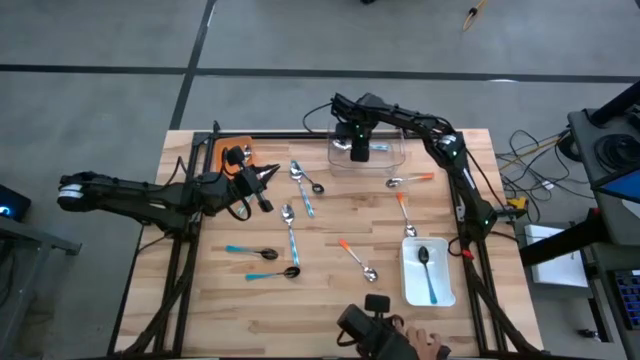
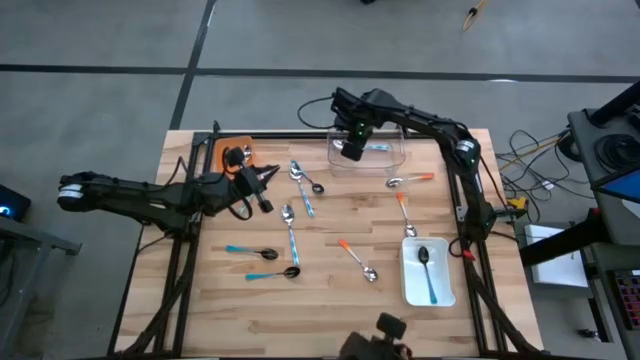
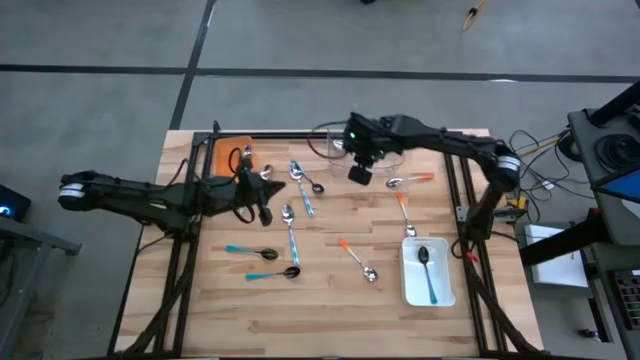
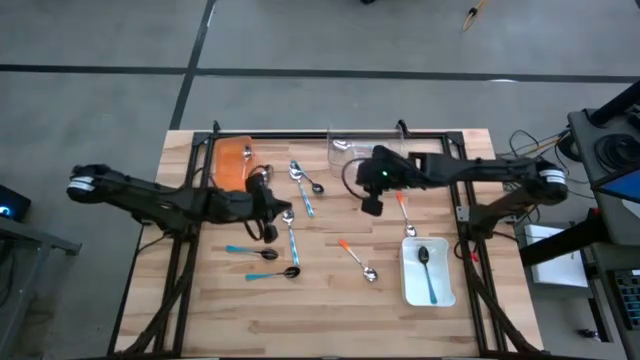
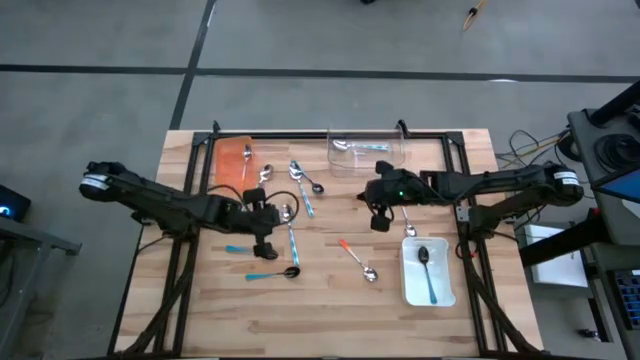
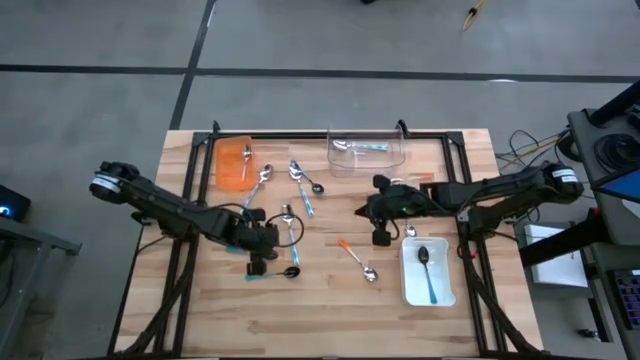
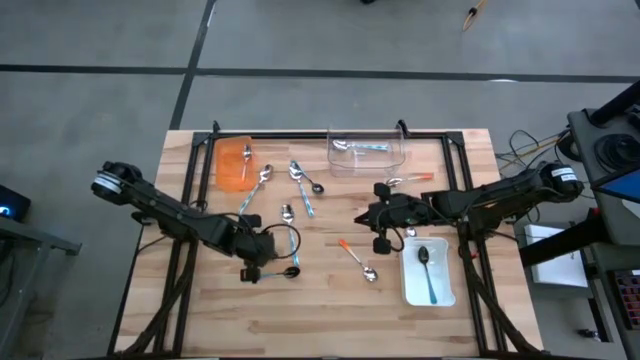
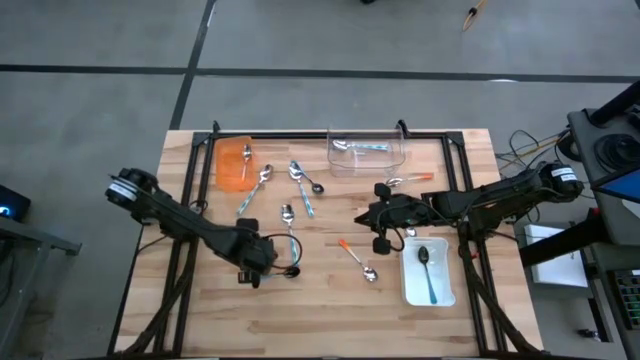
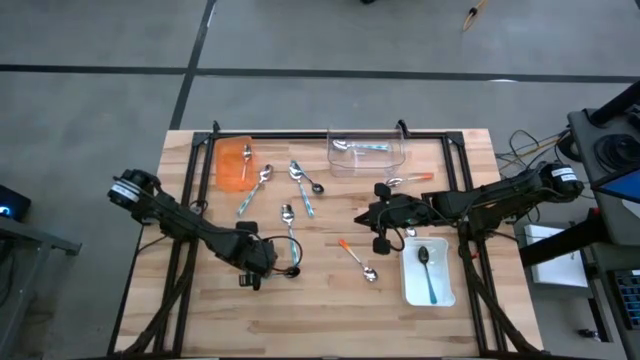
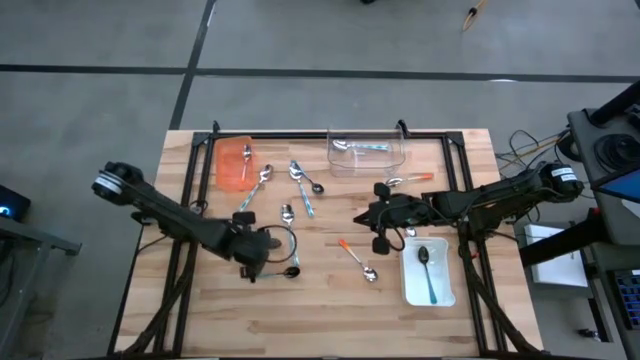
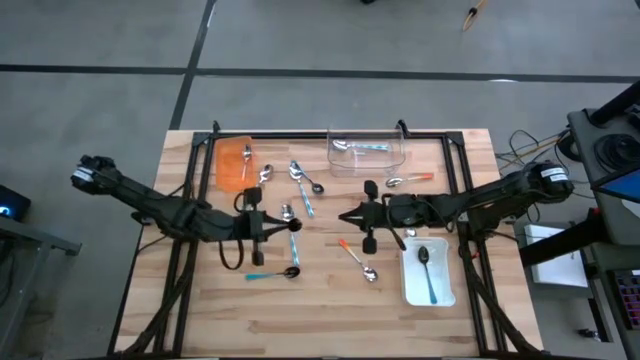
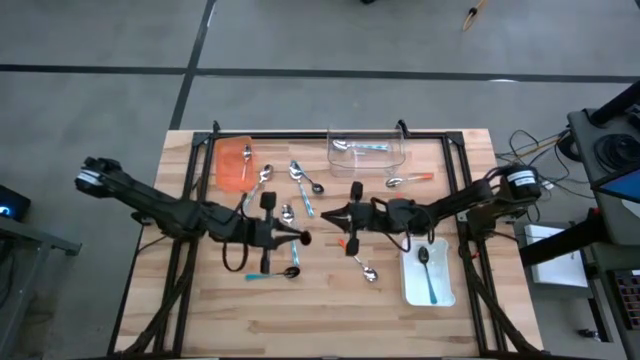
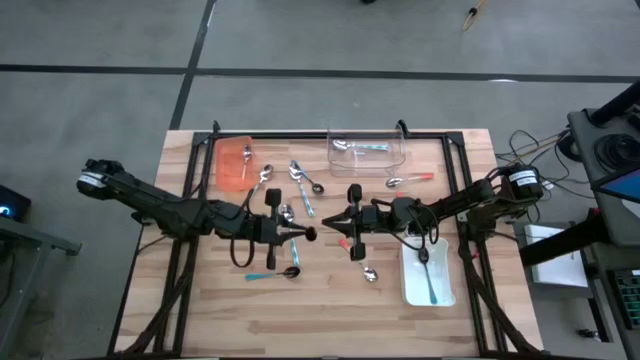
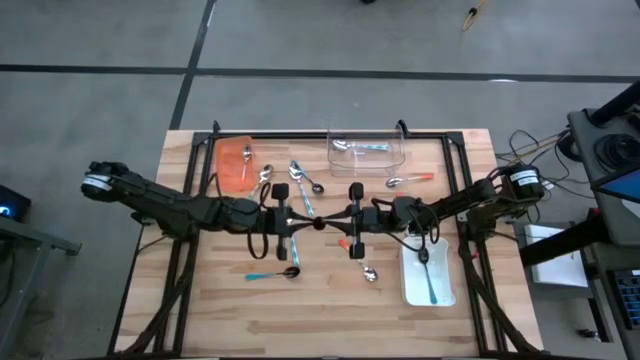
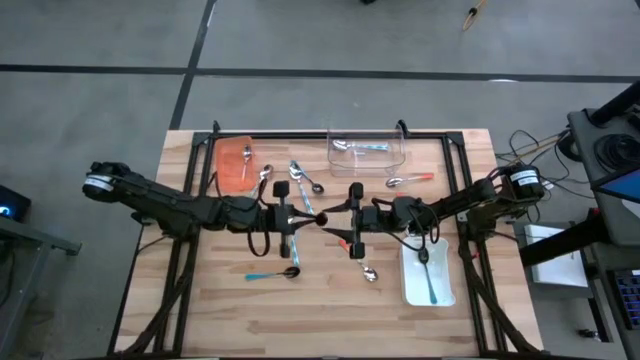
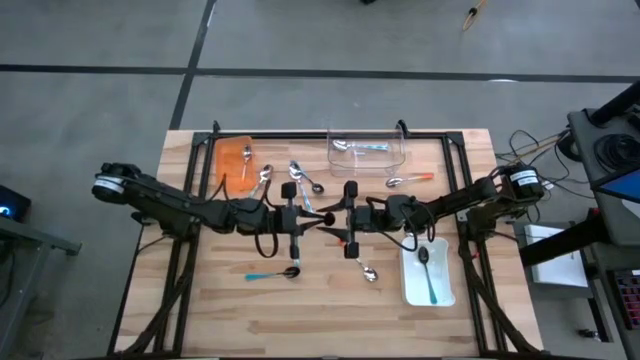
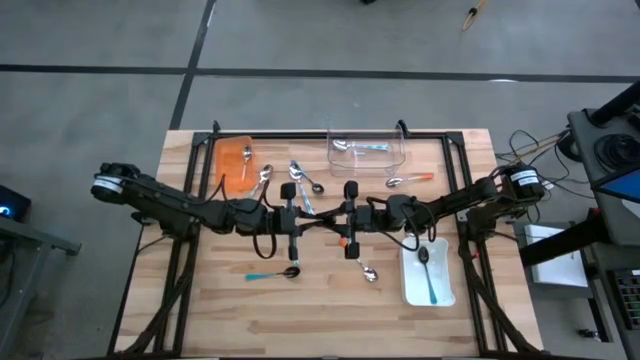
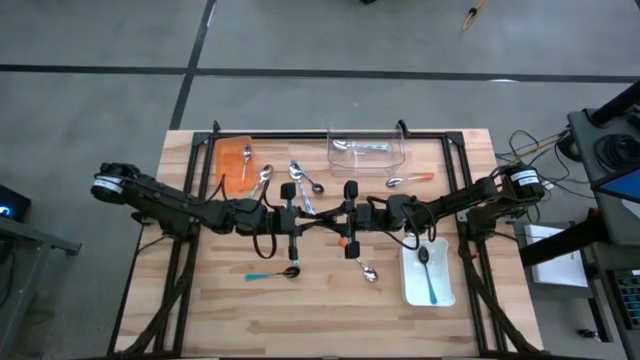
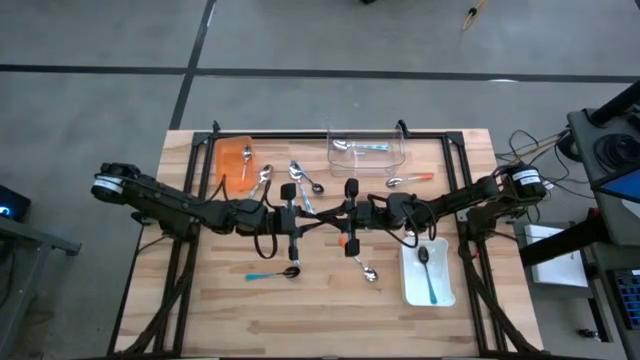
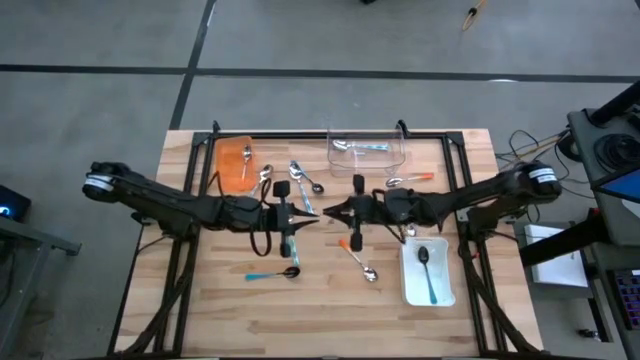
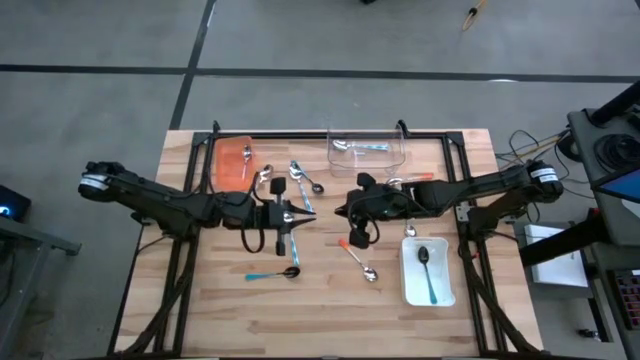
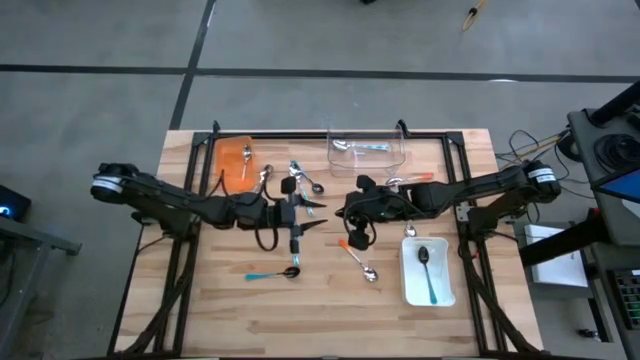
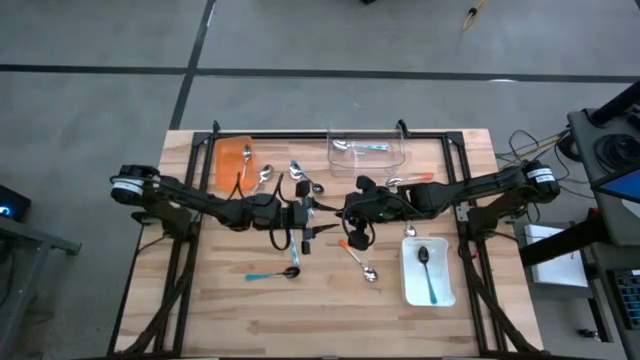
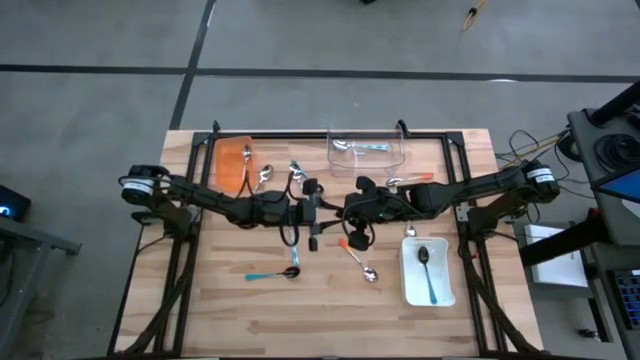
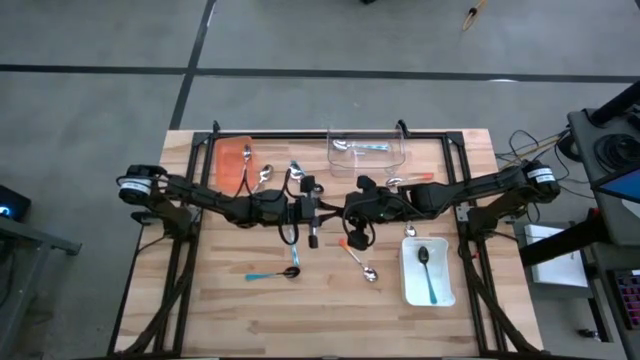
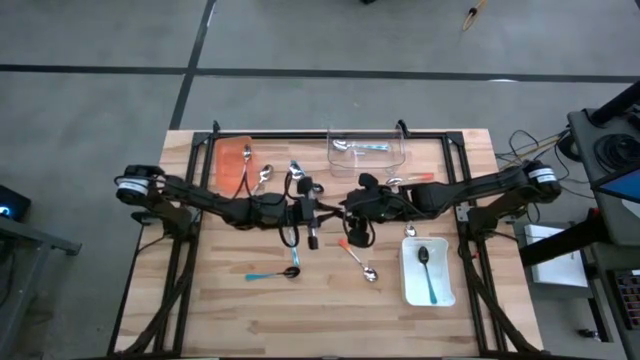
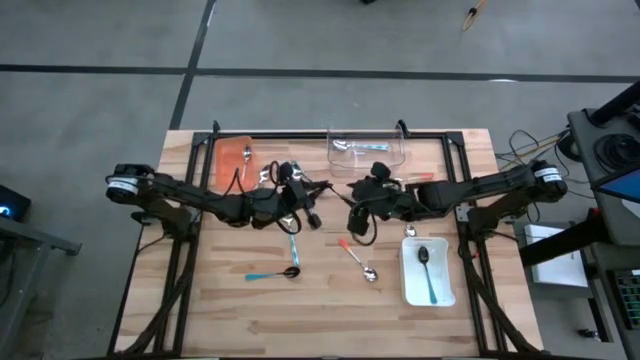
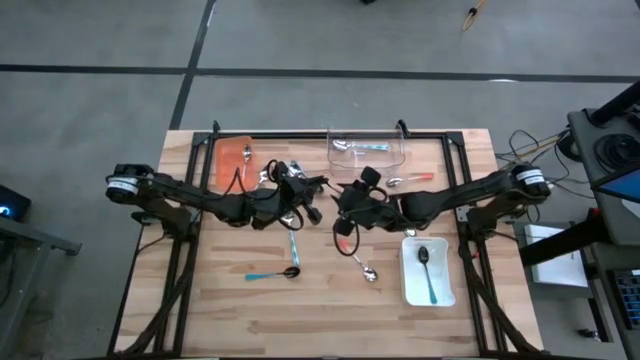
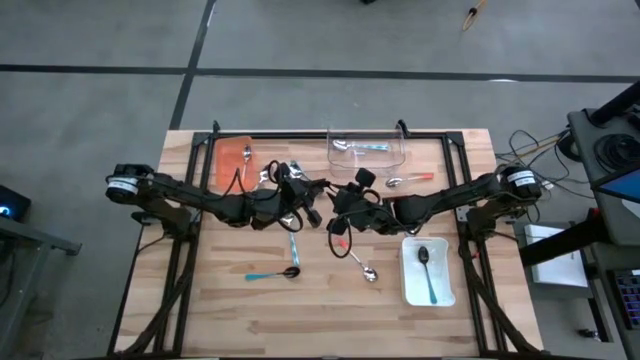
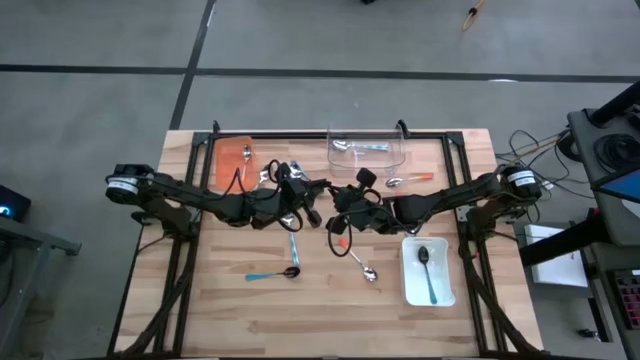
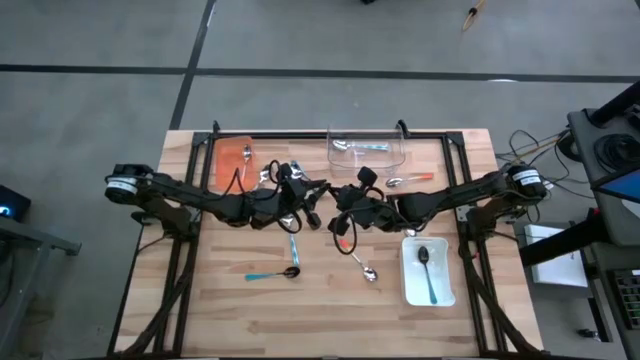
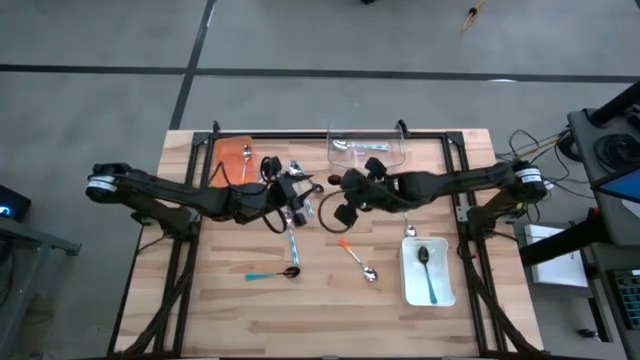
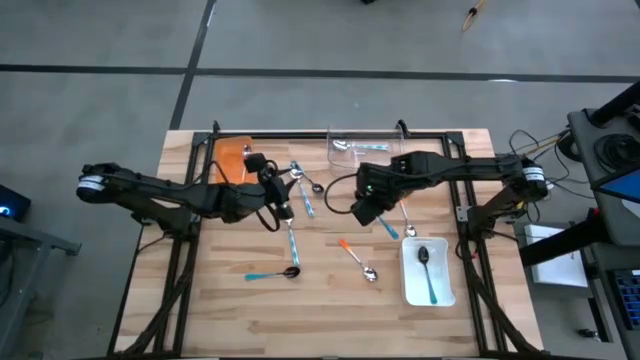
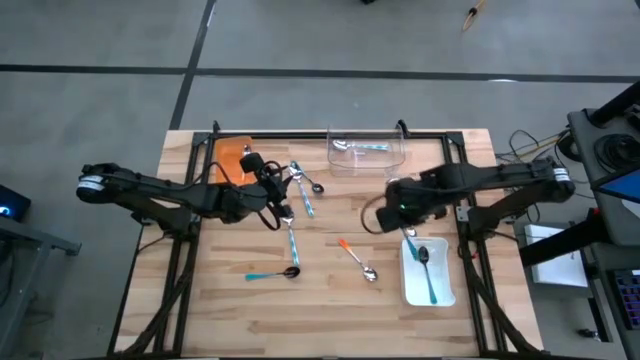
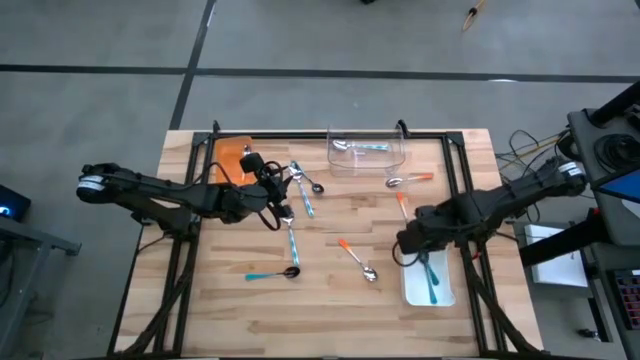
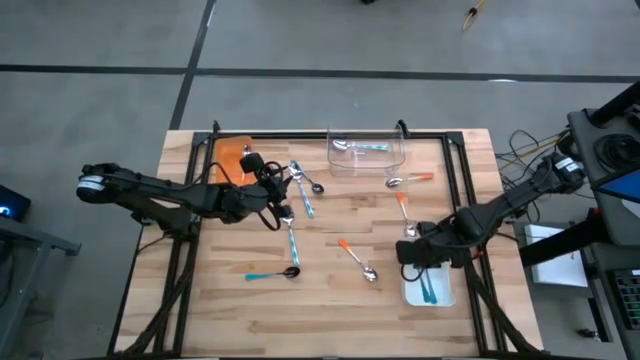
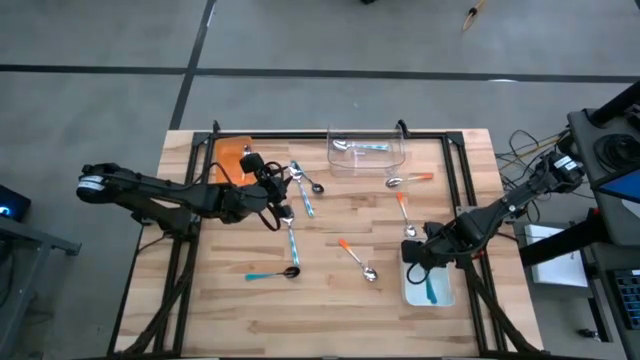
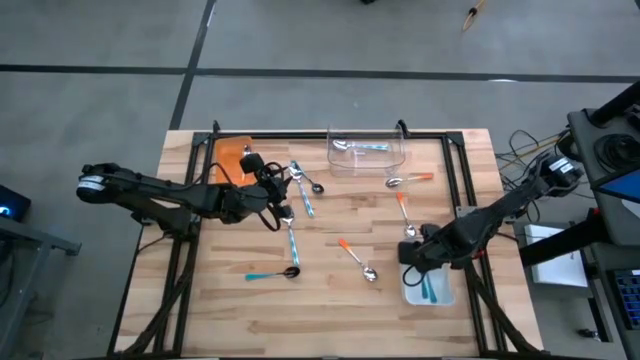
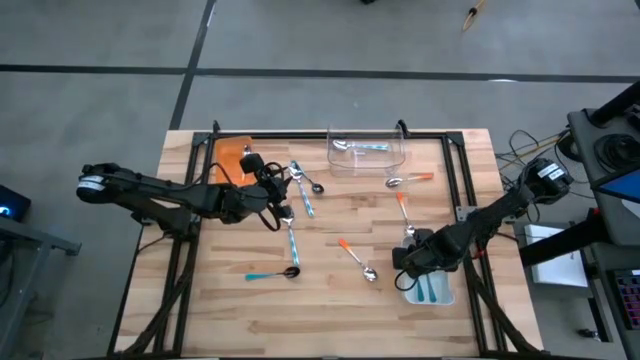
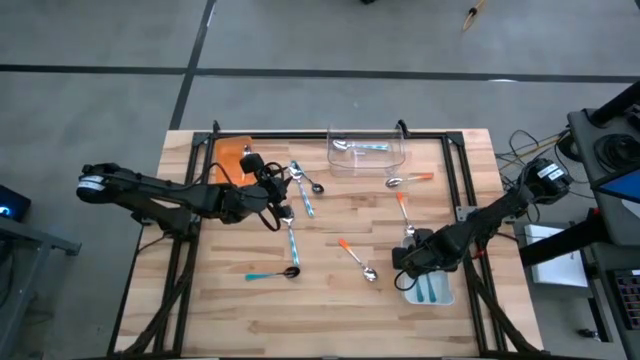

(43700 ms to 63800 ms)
Task: Sort silverware by color (type)
Put the blue spoon into the white bin
